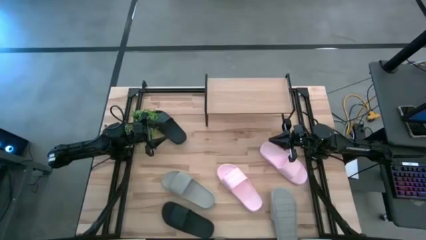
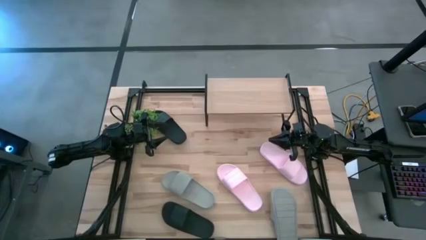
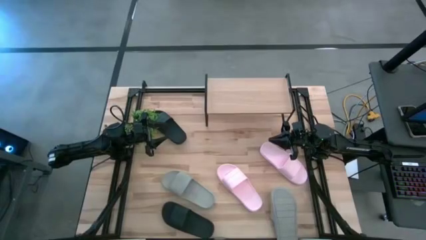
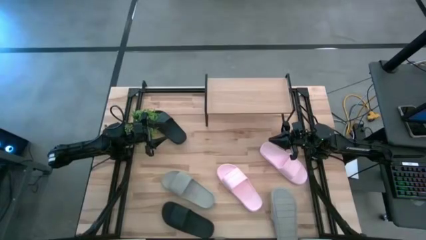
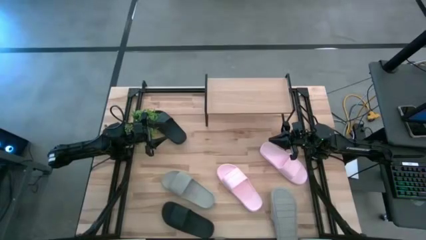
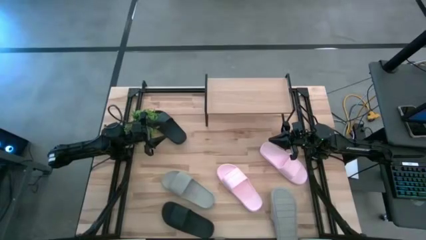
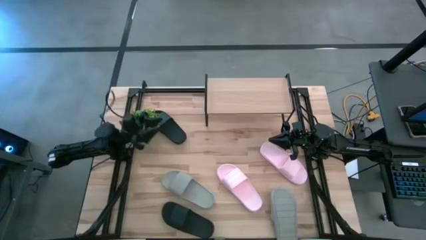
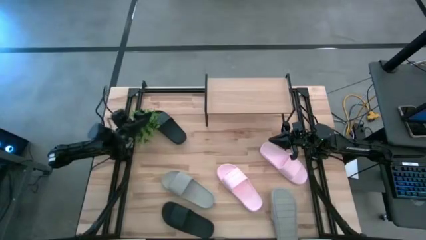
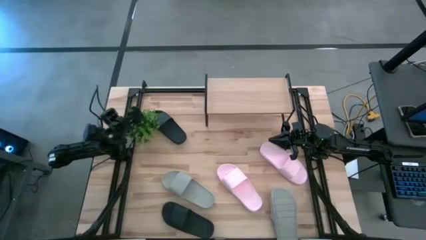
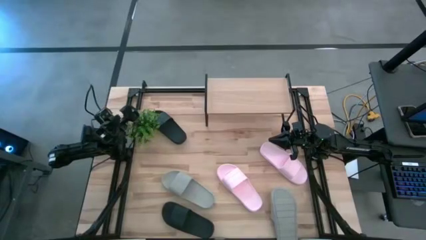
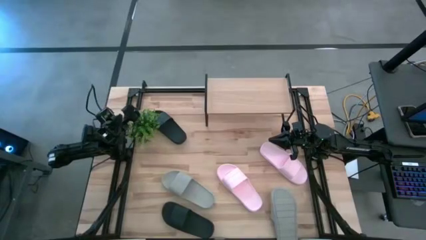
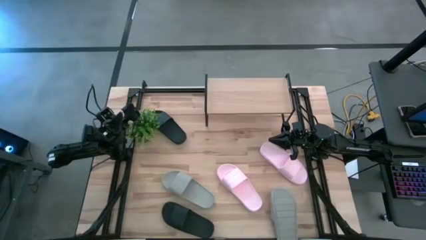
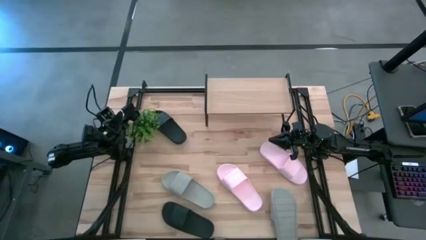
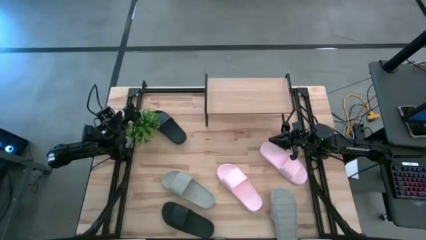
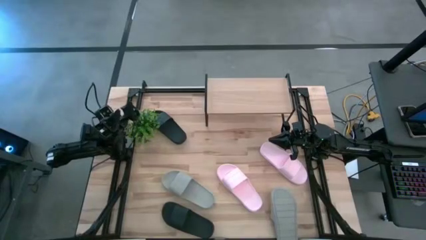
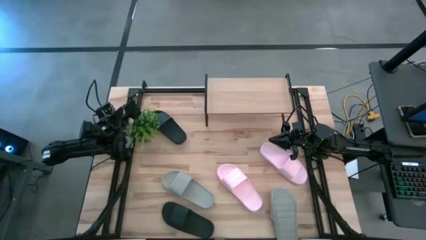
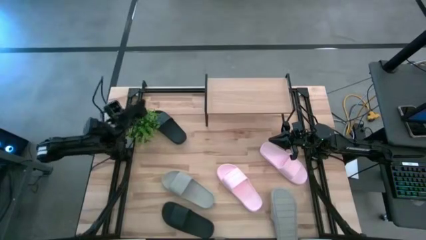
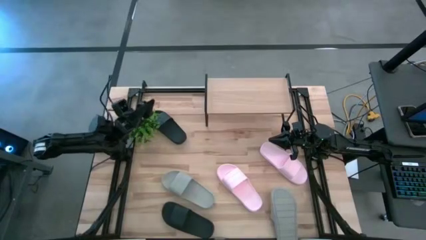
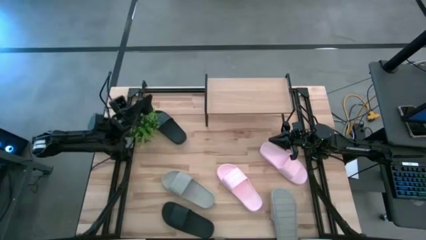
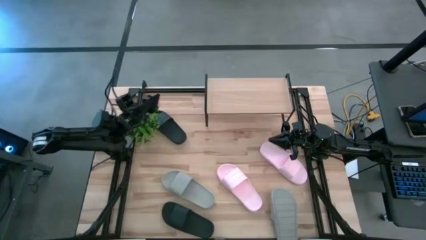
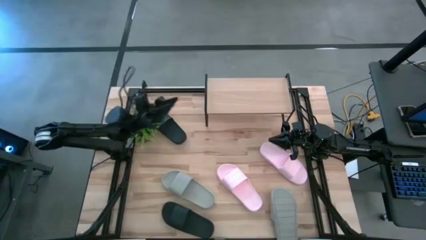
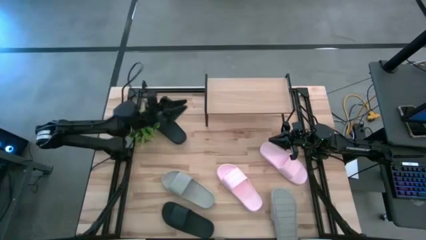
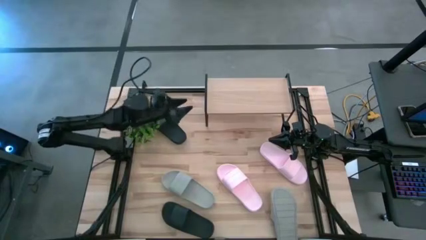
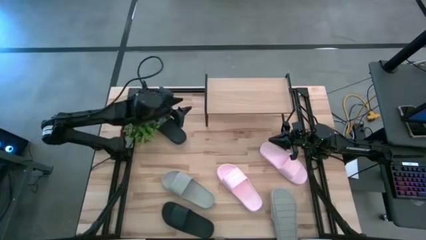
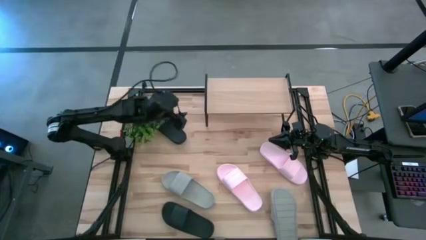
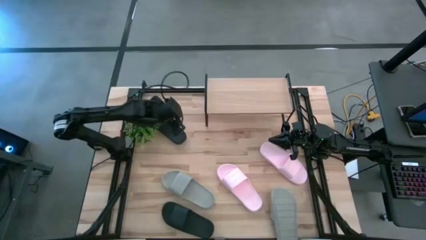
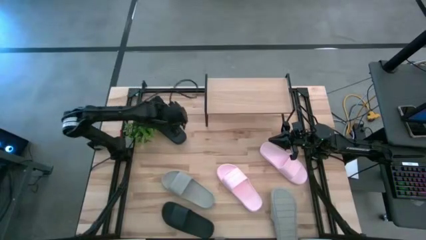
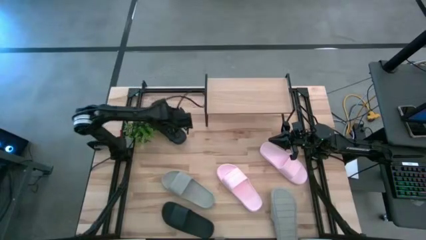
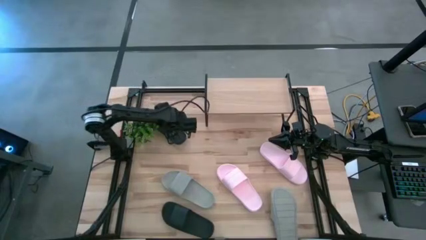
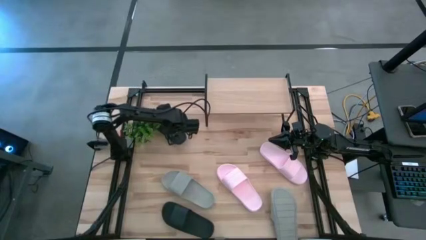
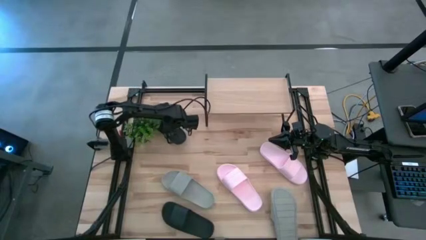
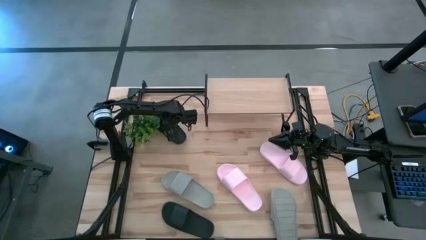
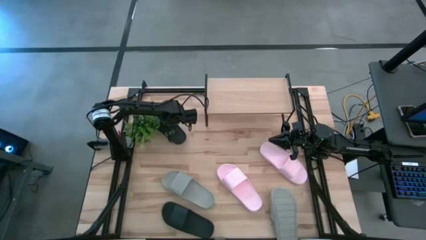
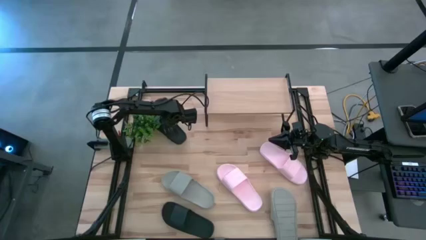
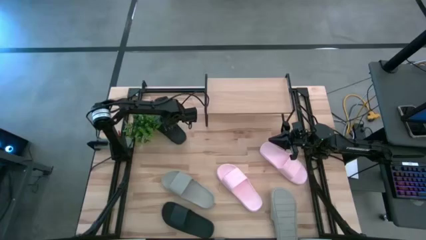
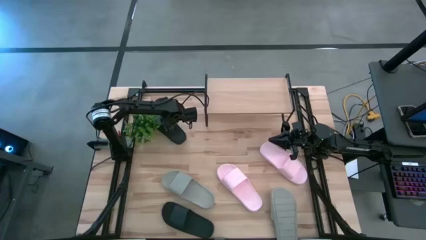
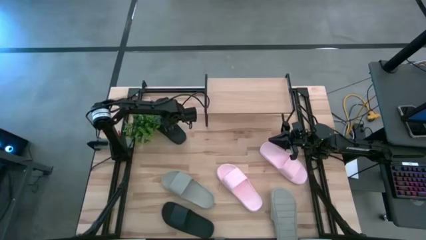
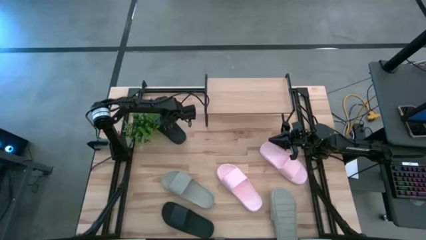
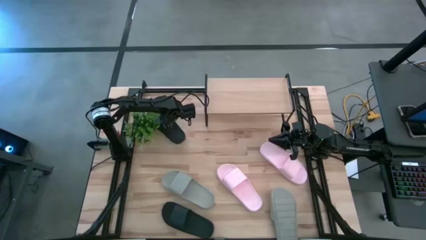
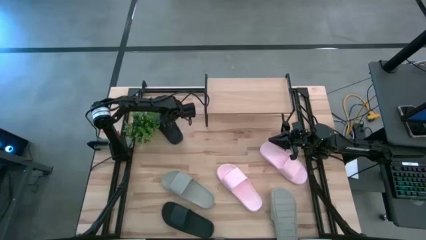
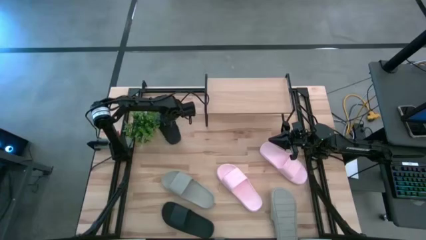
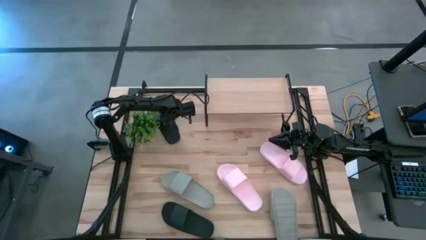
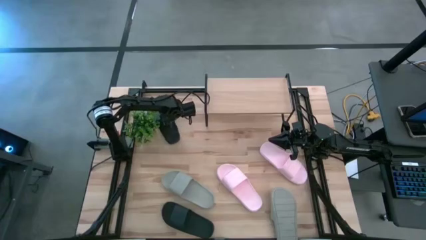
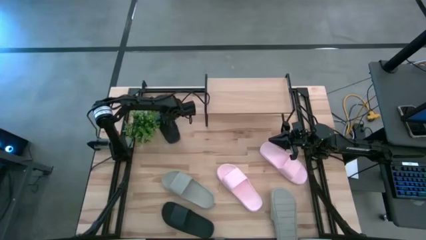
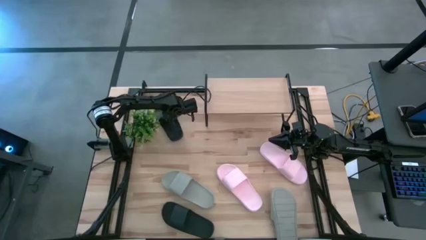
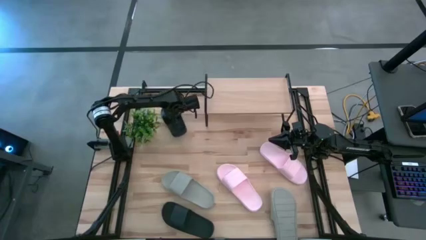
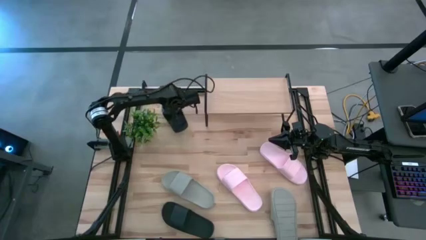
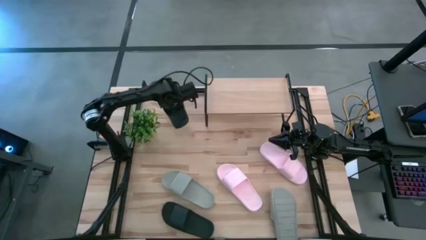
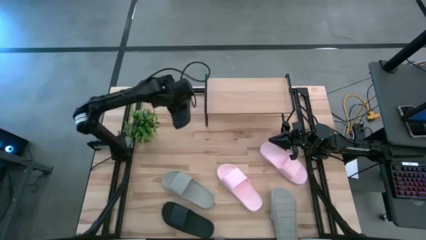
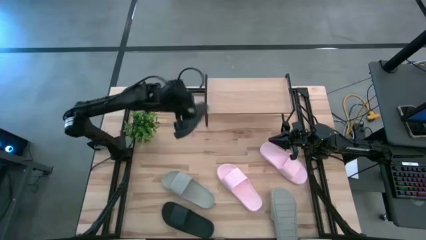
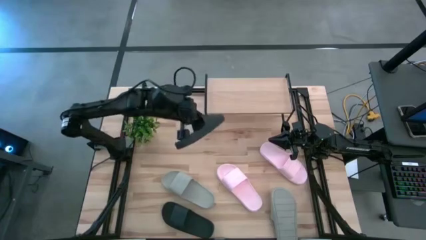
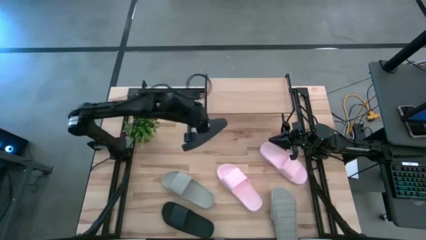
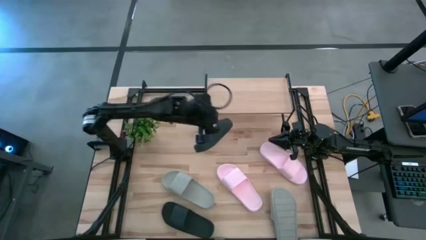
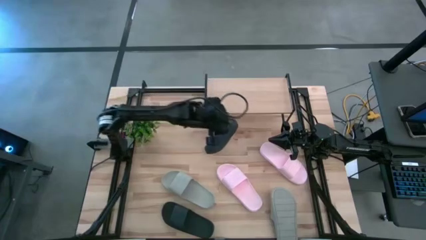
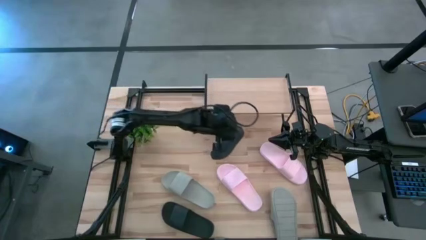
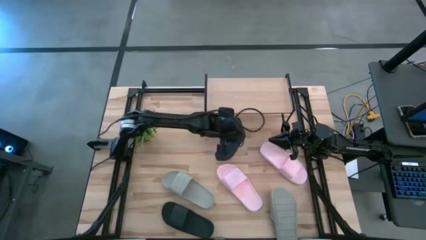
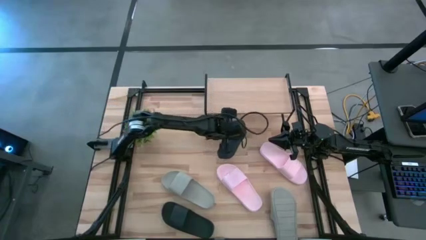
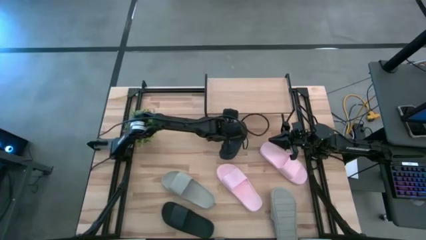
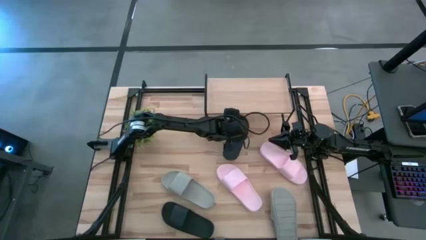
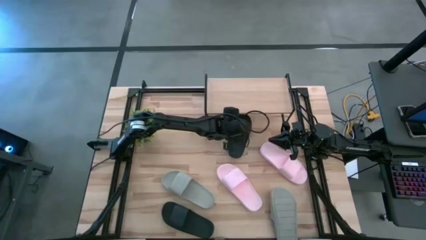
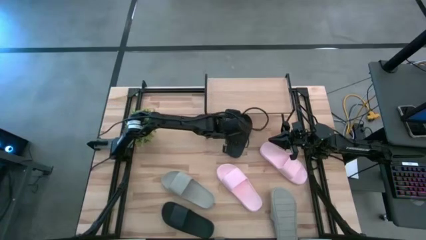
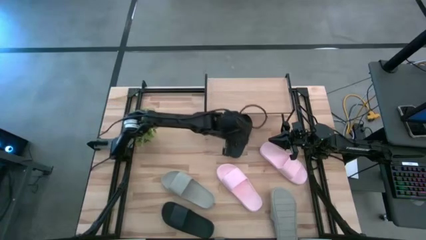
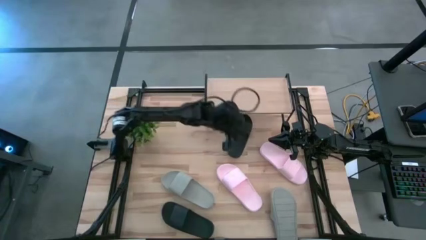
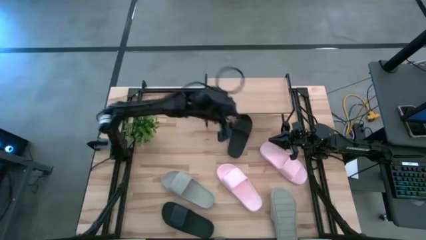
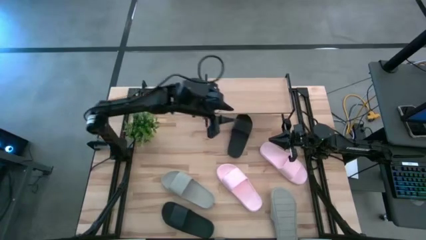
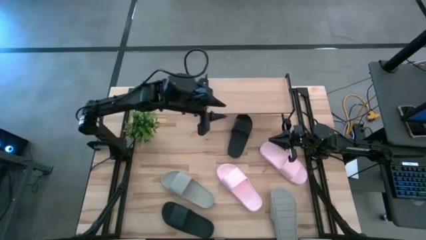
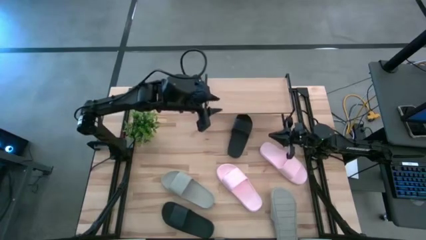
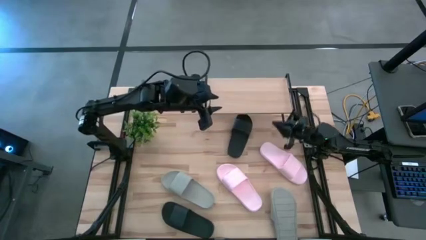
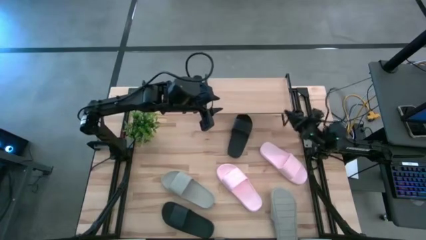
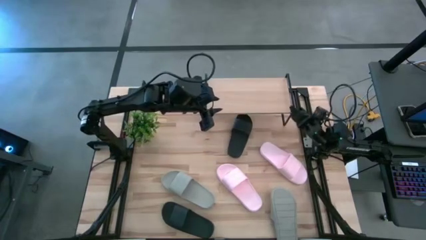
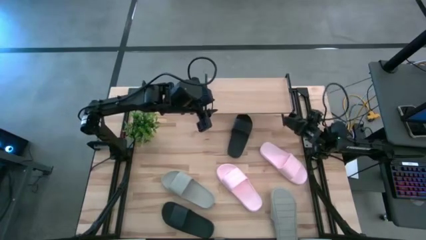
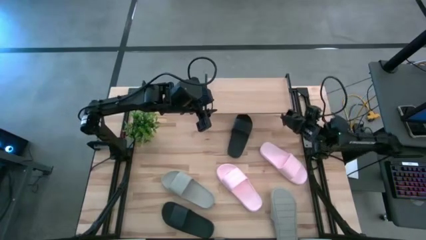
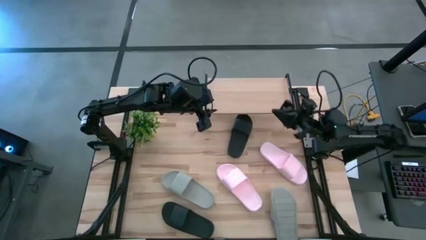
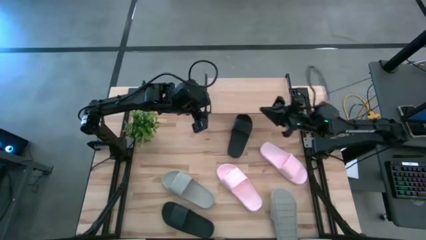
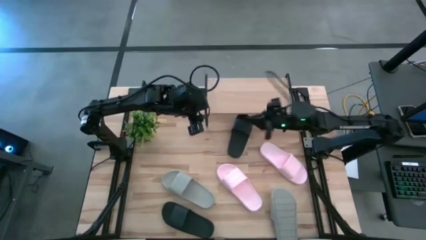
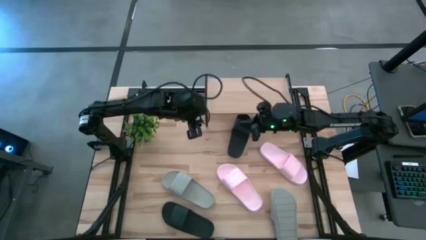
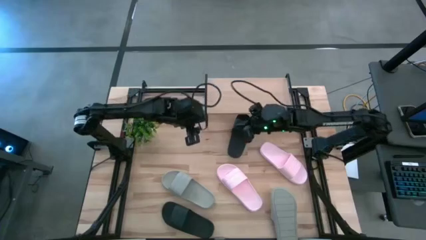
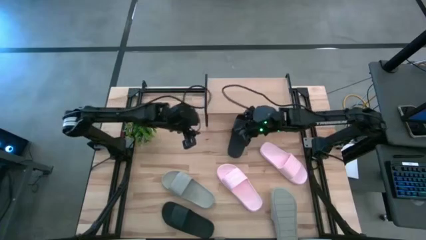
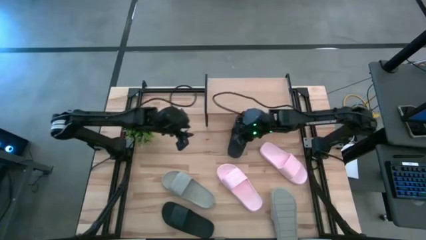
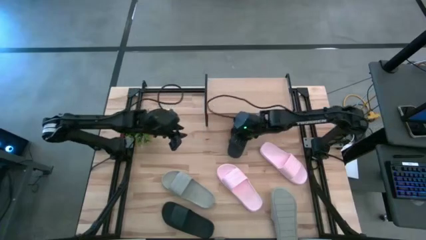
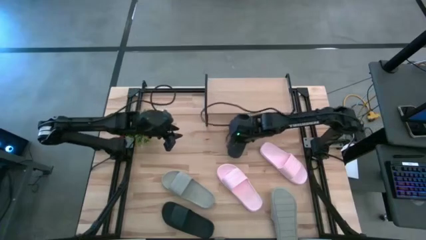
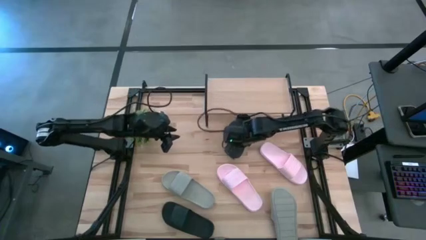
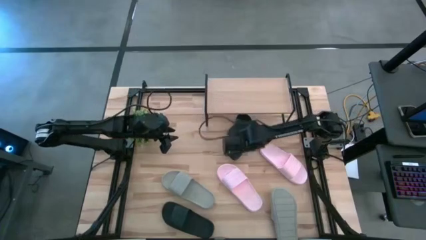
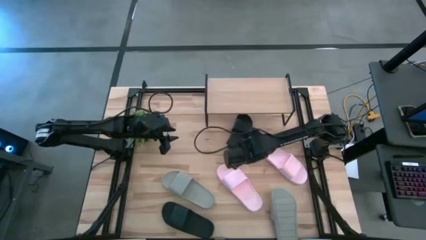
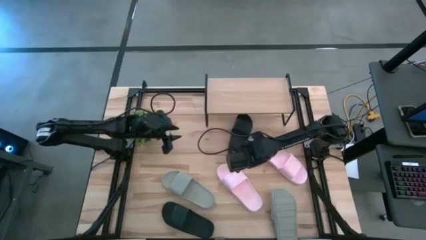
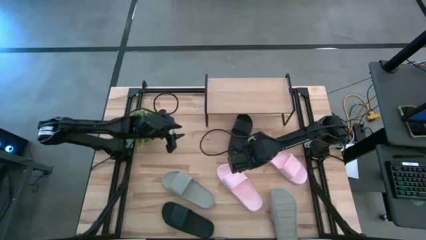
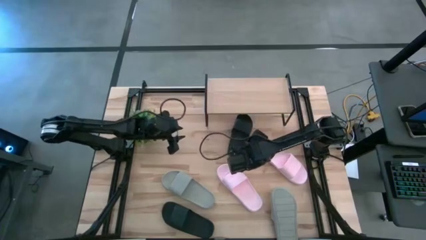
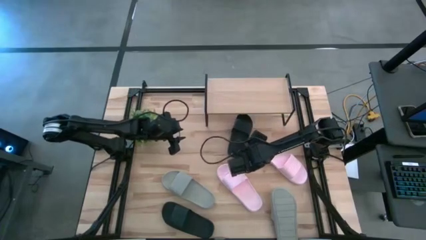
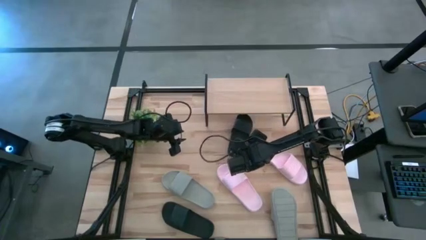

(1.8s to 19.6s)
Task: Pick and place slides into the shelf
Move the top black slipper under the shelf
